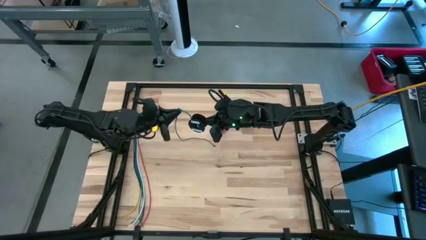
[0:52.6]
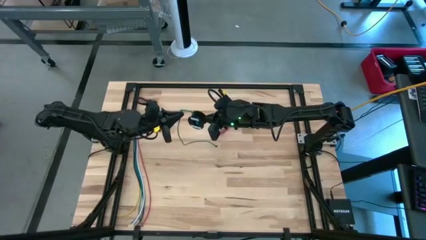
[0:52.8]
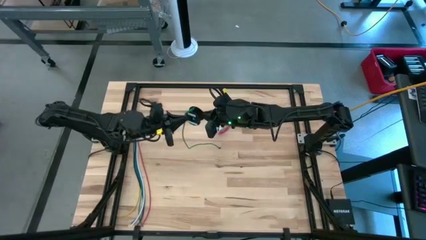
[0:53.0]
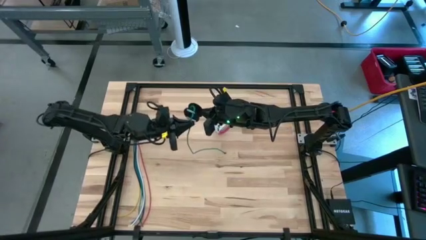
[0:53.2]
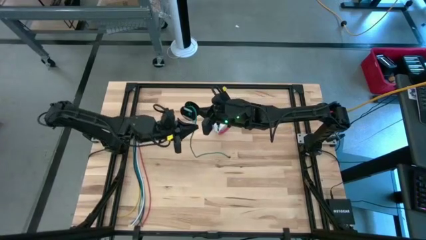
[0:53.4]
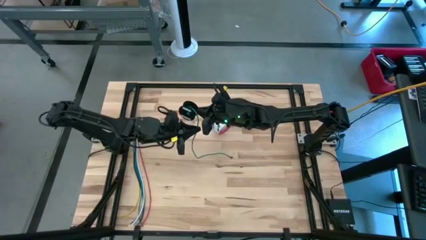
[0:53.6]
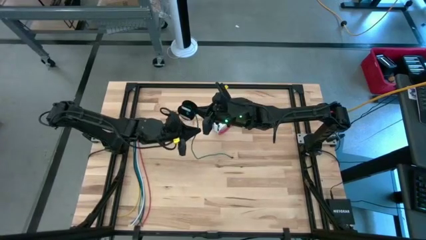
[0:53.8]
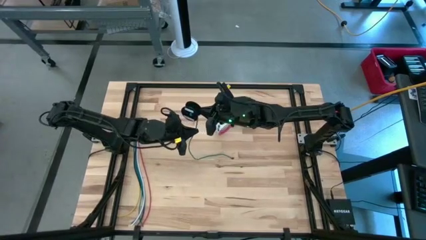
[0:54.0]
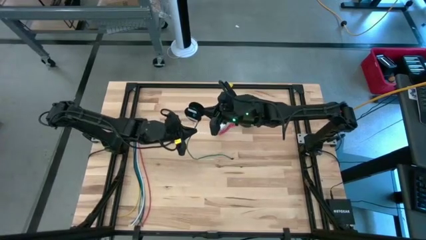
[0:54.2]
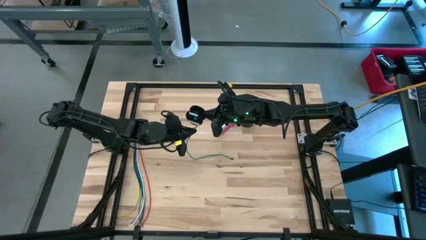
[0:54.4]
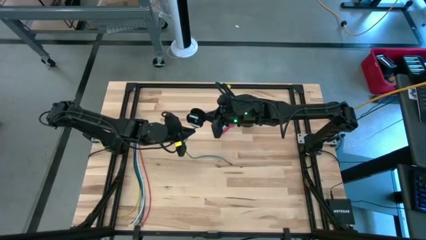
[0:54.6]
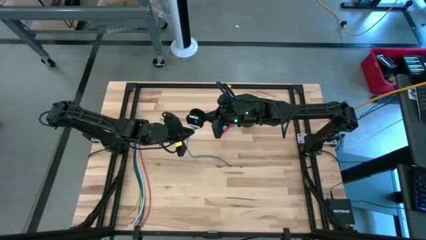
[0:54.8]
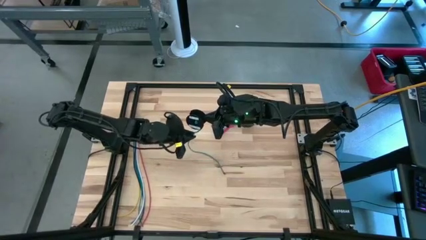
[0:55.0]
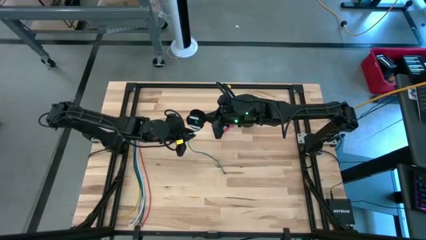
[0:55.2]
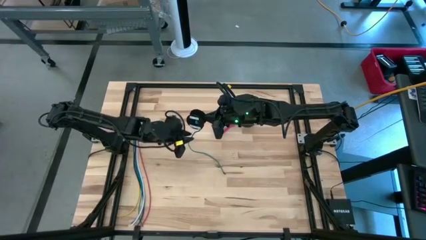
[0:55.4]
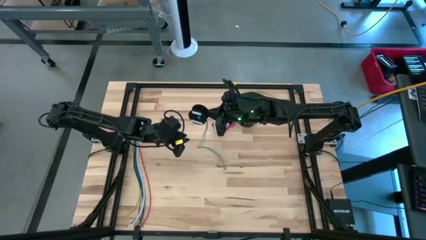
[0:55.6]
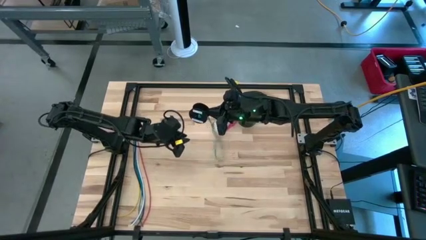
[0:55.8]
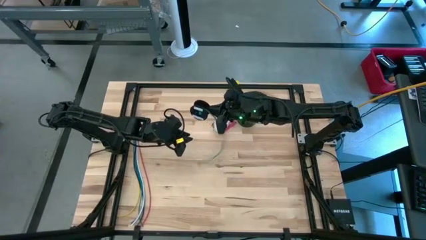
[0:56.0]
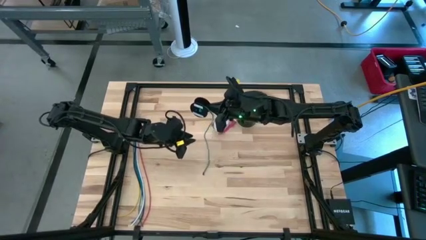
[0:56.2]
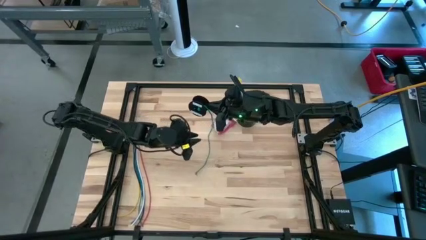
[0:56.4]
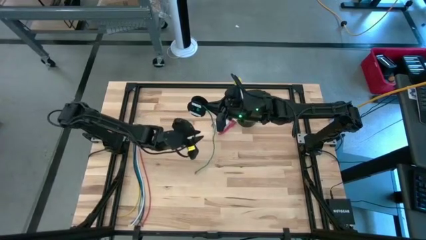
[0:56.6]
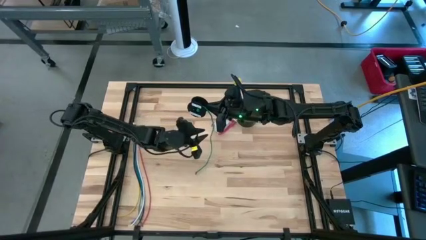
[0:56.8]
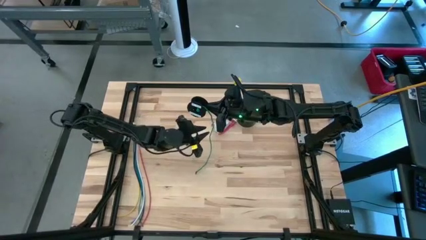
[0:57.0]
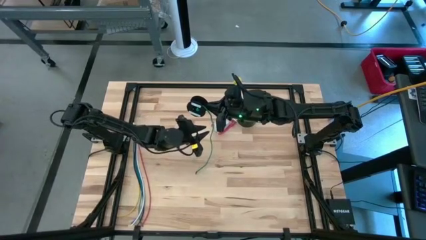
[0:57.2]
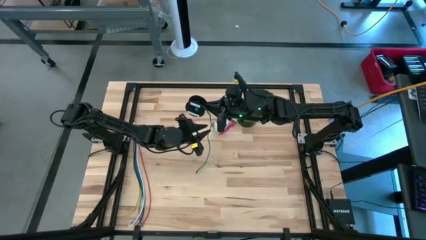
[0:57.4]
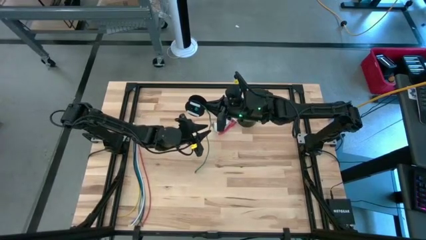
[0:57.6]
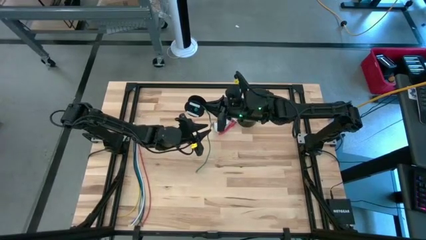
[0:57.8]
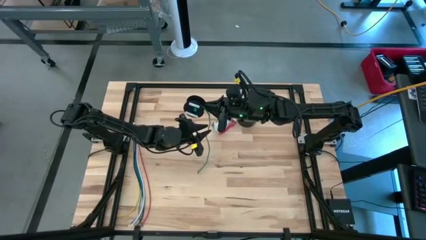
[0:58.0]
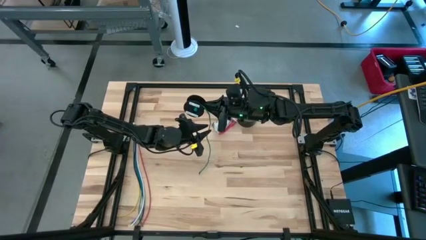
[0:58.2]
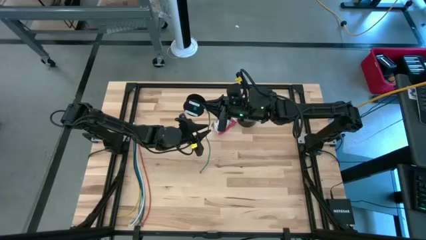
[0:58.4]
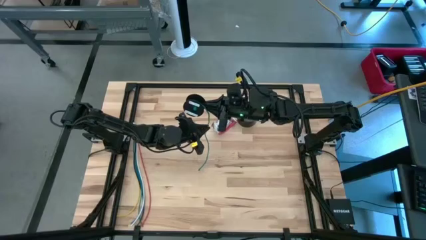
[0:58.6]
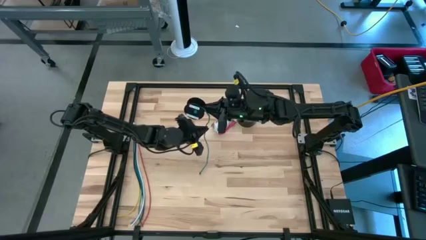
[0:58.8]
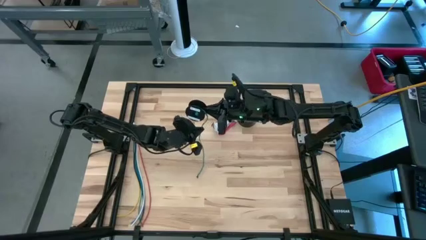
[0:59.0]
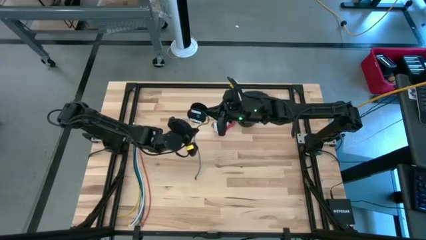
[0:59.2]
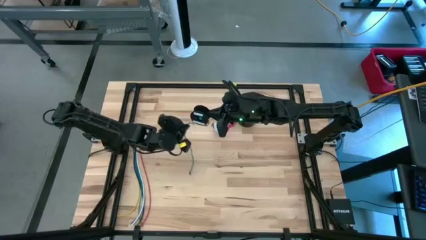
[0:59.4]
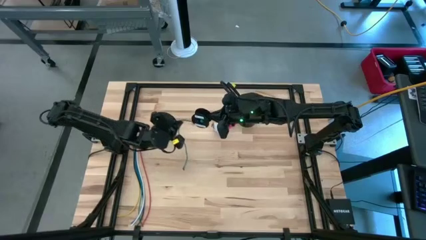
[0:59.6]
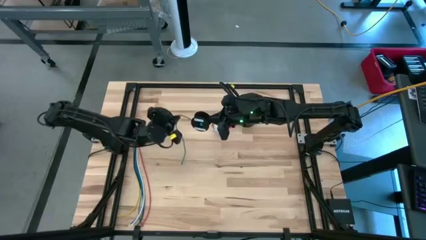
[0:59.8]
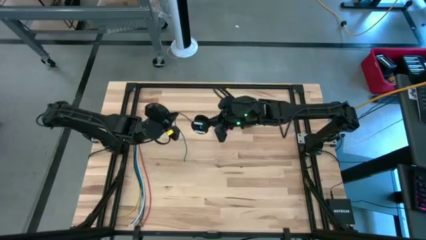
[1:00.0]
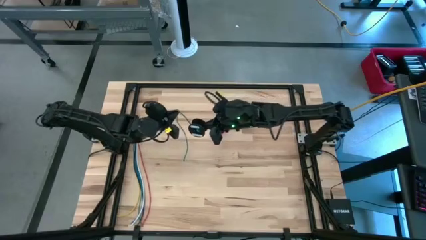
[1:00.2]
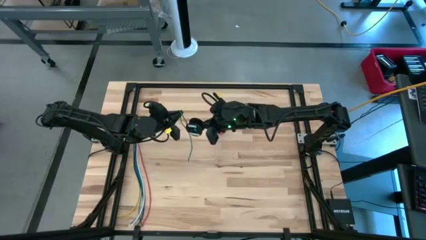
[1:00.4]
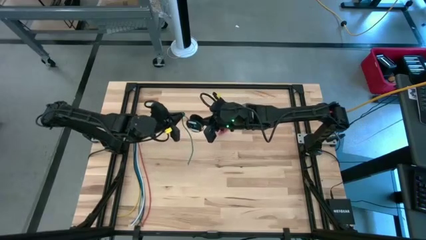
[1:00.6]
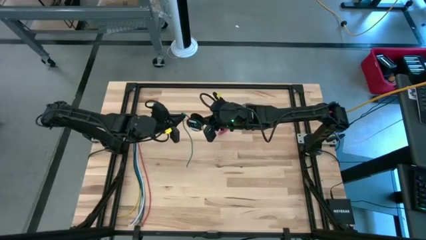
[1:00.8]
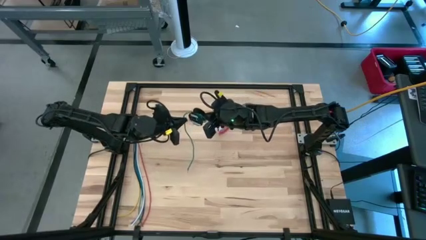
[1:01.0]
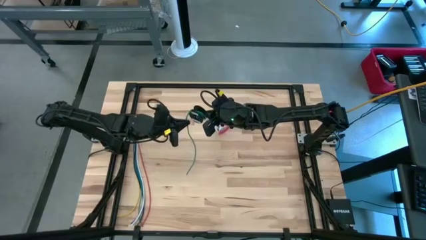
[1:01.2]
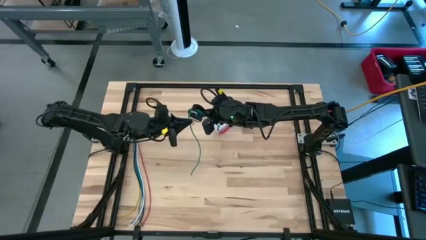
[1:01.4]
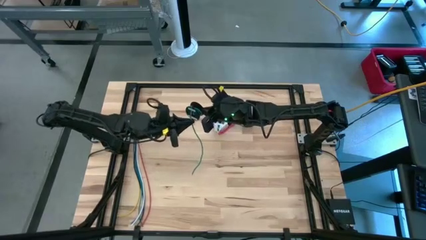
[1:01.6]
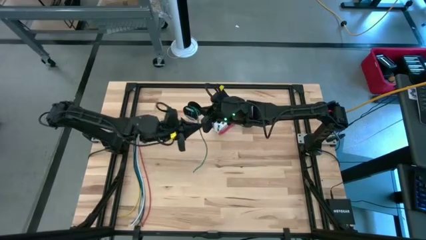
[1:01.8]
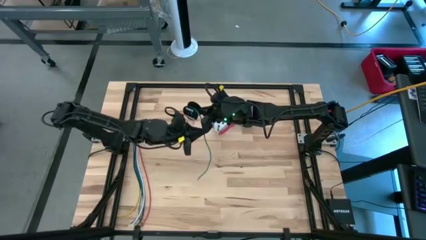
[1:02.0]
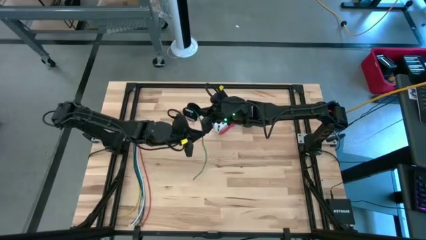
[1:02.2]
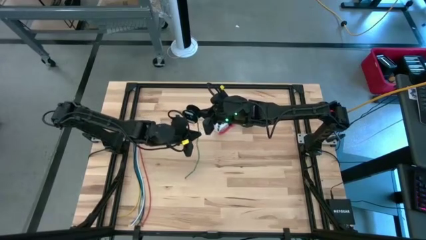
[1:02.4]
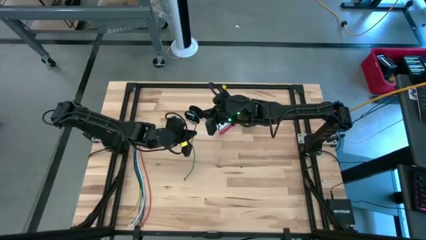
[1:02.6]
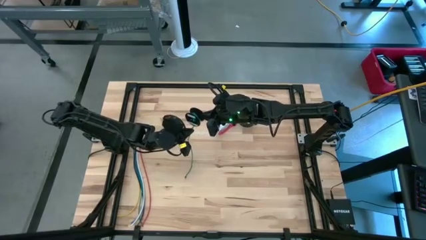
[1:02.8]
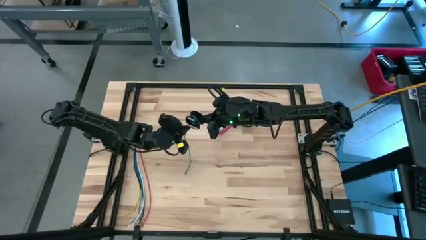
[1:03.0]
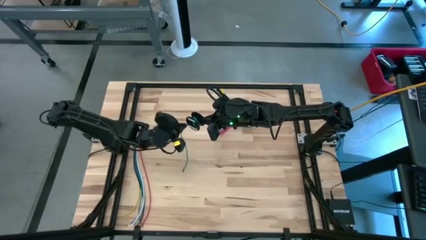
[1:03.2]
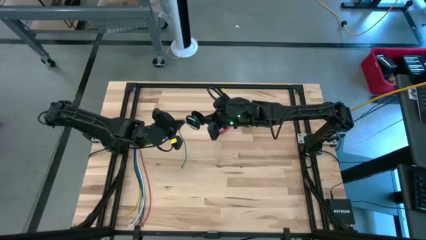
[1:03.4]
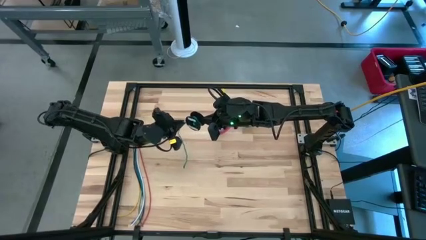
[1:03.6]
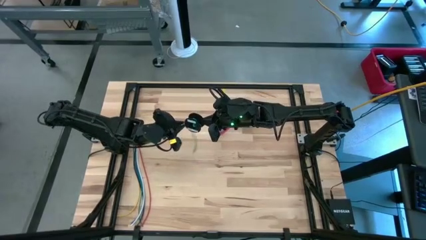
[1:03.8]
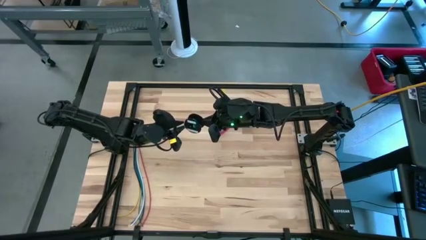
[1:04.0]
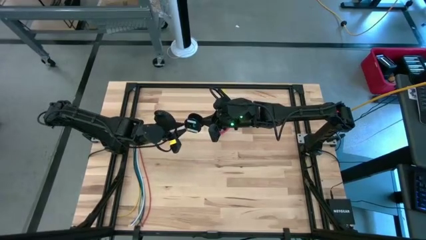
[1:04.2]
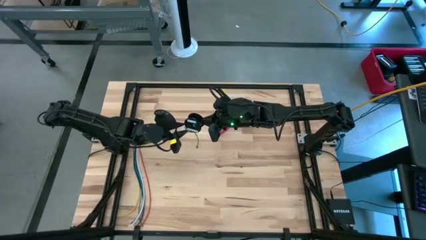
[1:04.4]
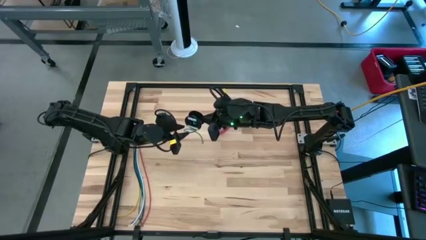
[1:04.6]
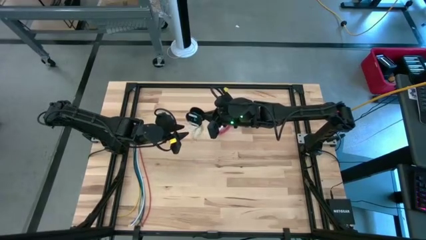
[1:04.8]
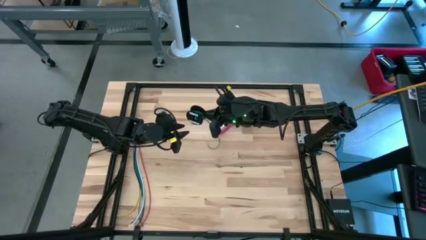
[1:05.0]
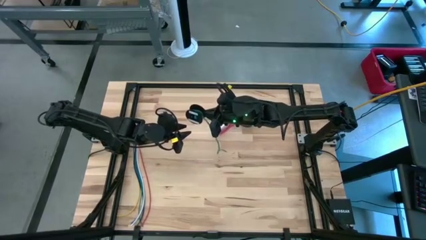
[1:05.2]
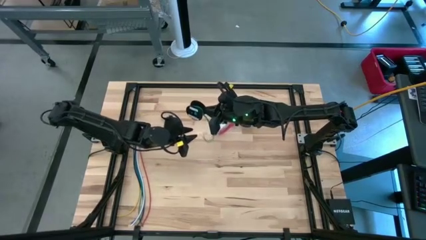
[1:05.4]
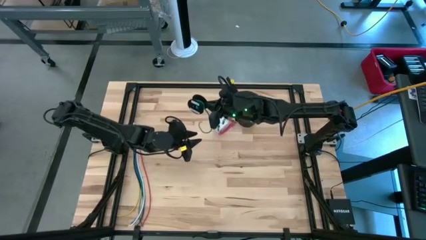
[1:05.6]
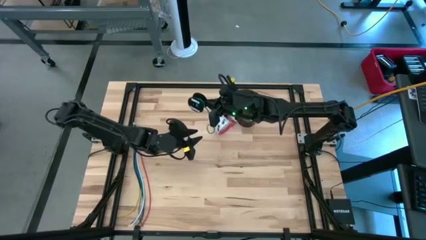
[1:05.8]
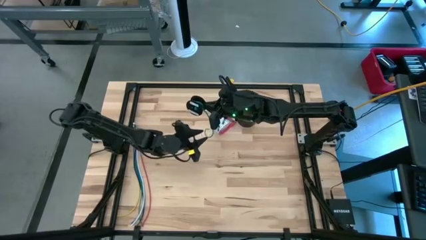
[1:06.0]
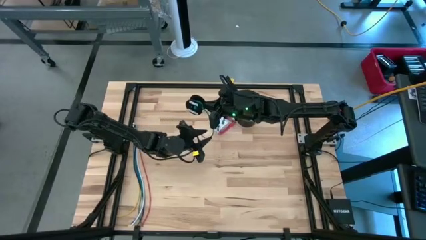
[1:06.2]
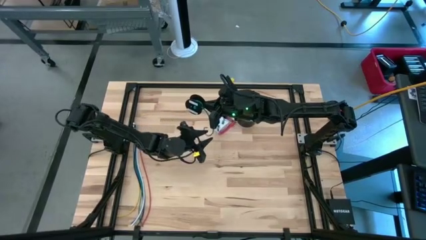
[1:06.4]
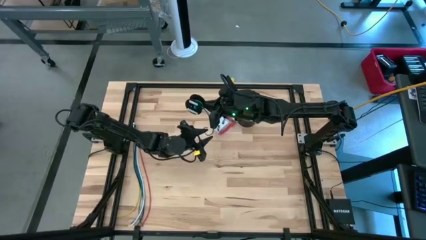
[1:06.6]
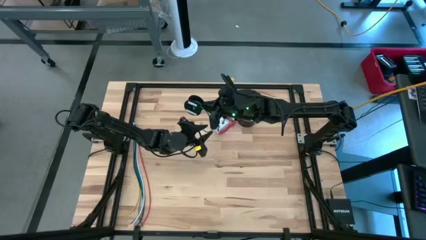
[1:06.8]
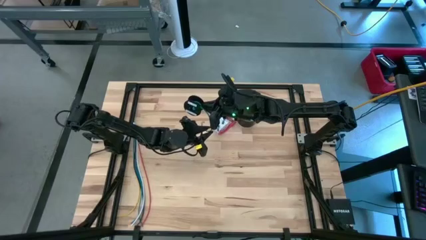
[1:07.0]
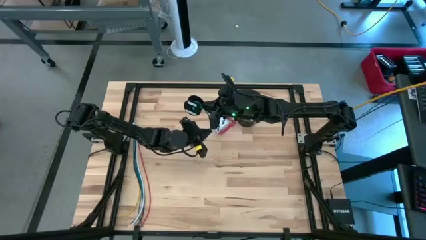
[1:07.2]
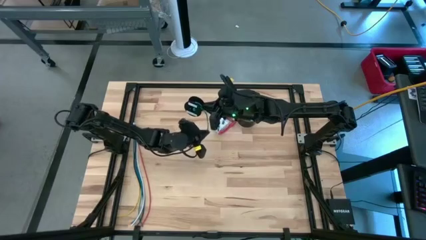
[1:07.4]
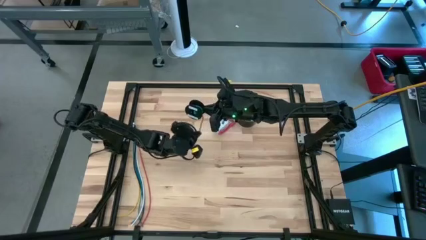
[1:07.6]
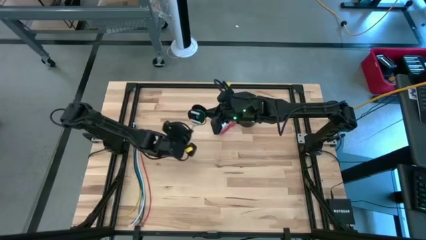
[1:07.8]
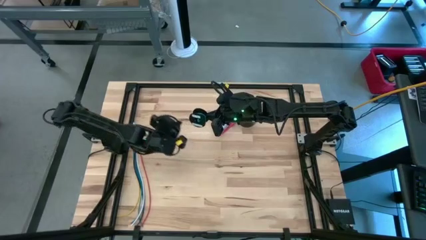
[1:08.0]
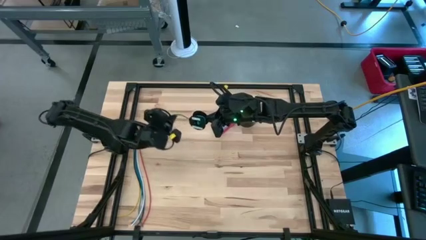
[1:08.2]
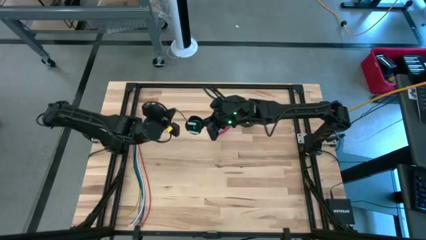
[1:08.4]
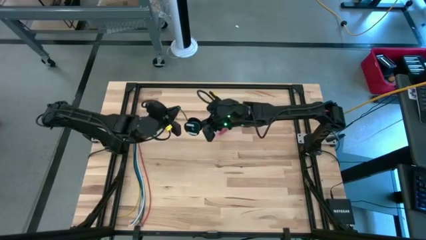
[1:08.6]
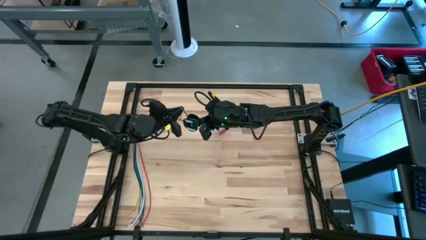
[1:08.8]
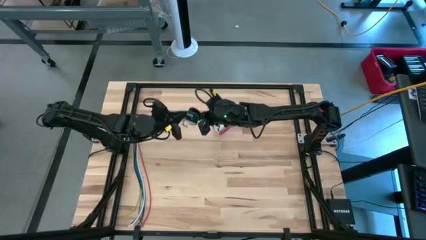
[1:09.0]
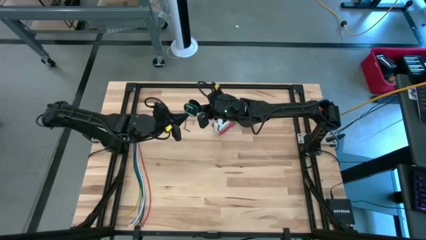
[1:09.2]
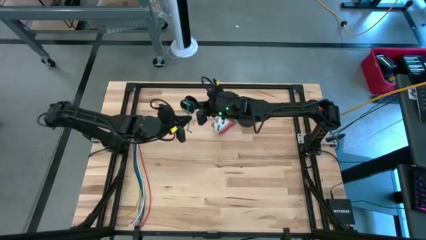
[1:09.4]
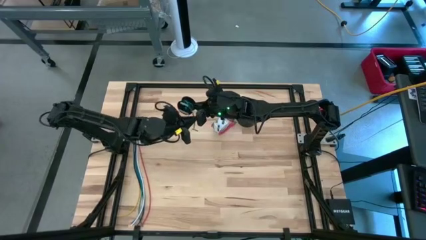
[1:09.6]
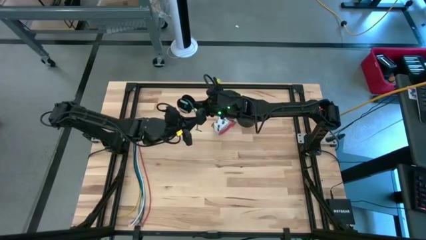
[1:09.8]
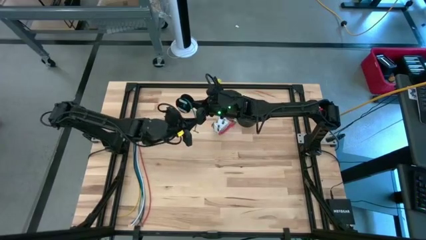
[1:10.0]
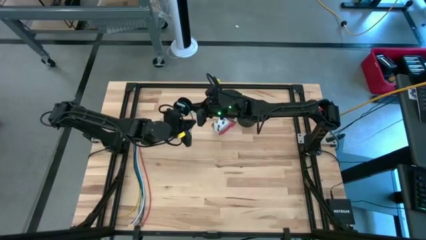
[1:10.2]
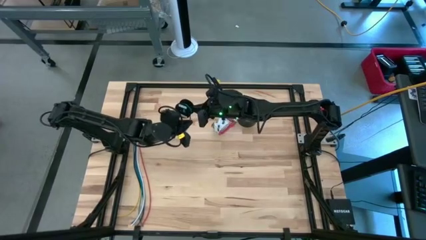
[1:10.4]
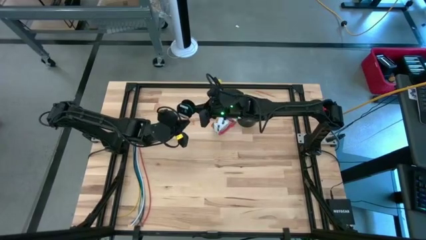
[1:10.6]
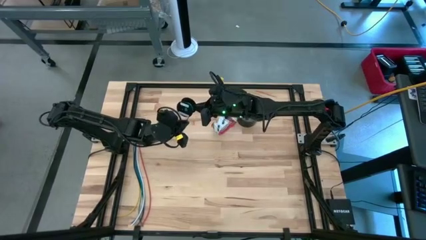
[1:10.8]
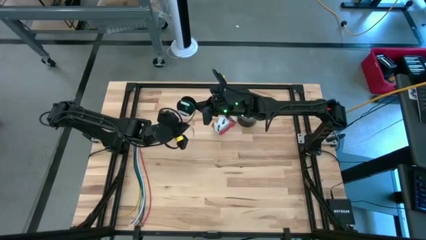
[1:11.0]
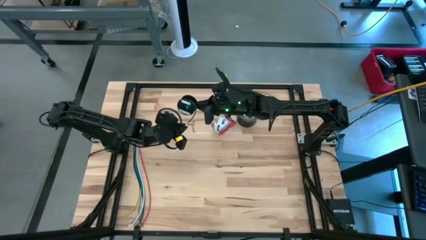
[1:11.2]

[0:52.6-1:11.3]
Task: Coil cords
Coil the green wire on the spool
